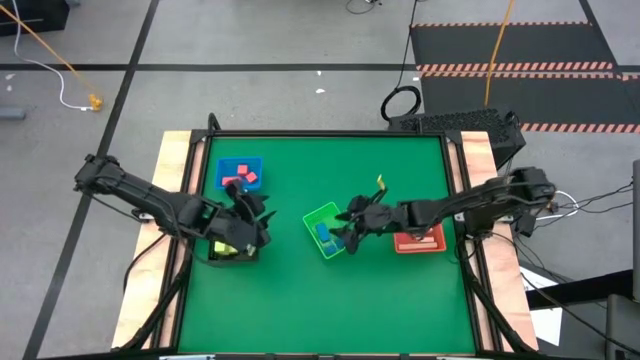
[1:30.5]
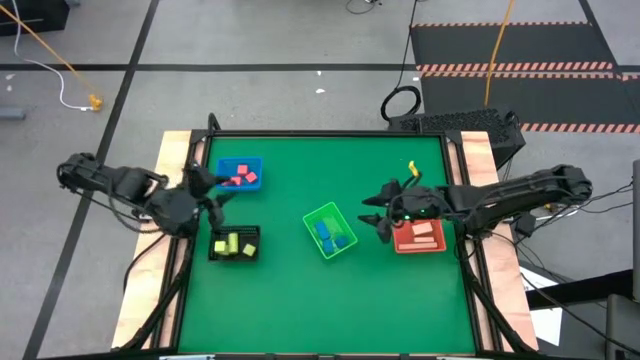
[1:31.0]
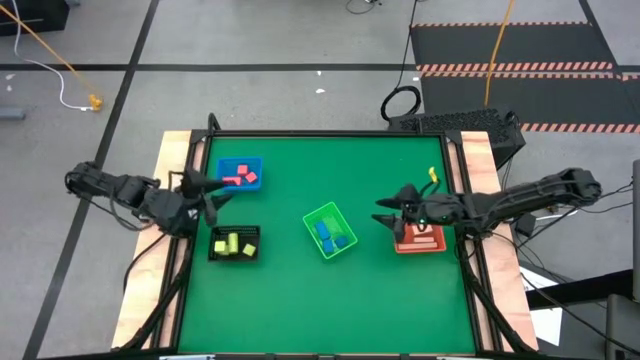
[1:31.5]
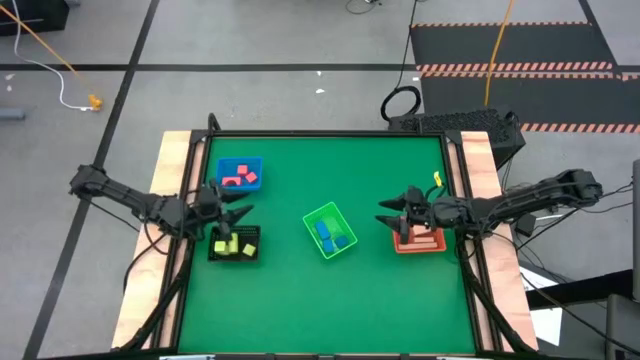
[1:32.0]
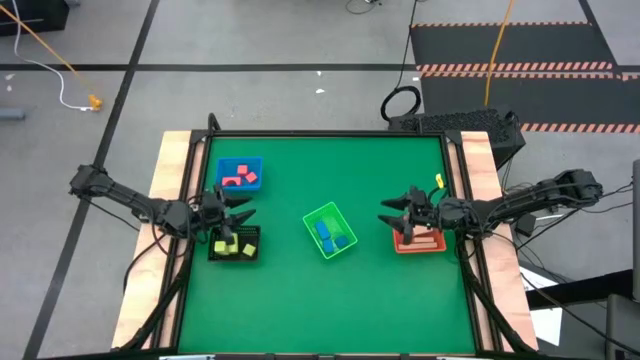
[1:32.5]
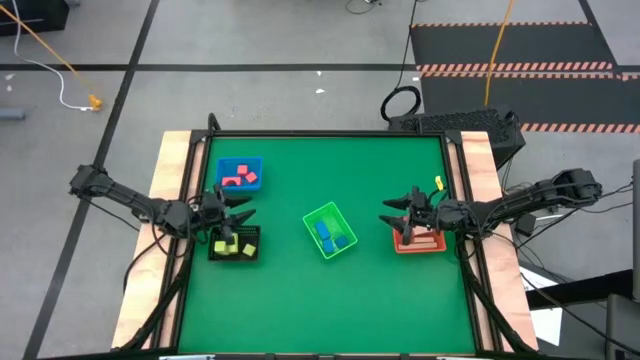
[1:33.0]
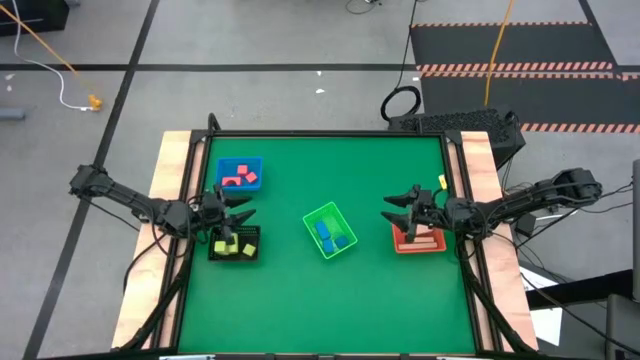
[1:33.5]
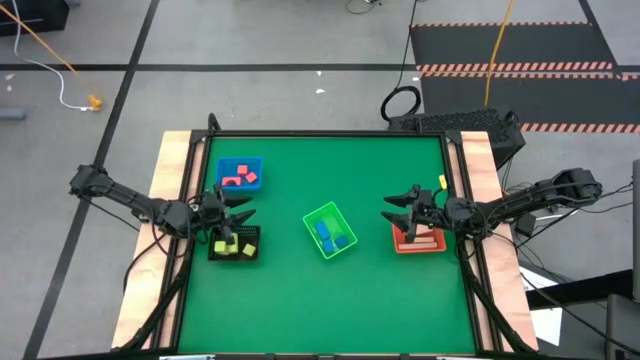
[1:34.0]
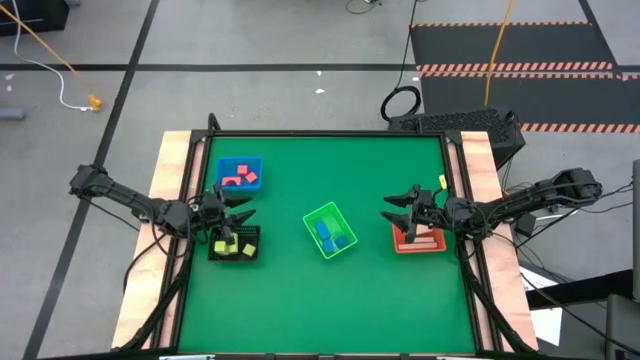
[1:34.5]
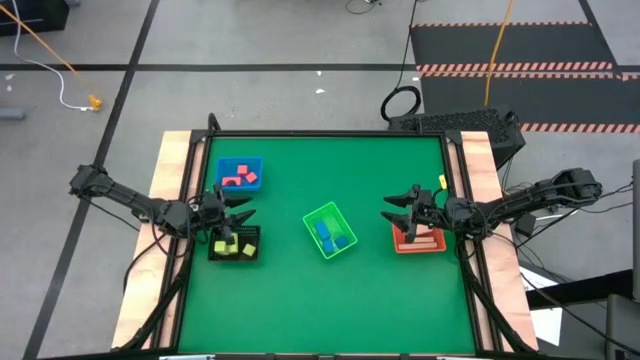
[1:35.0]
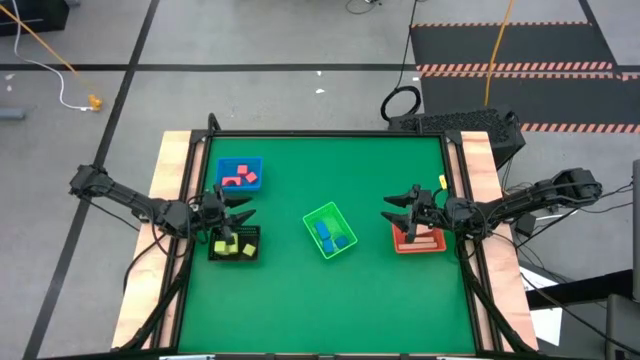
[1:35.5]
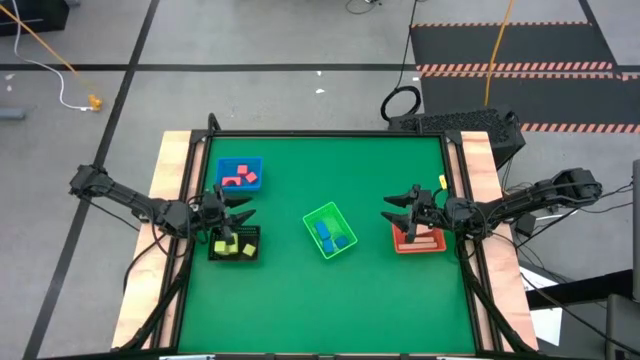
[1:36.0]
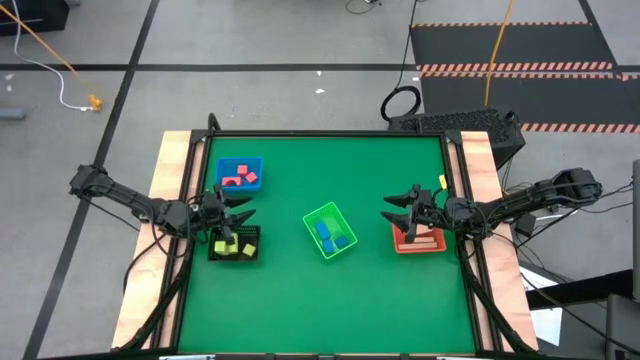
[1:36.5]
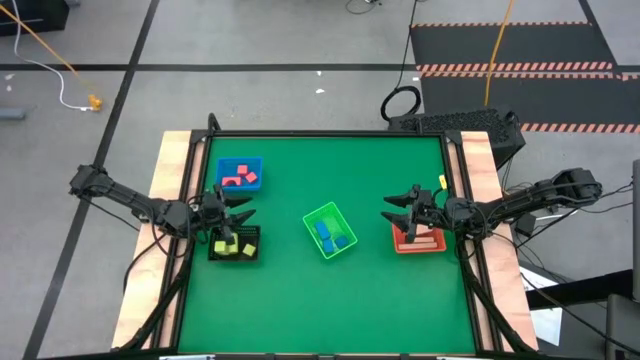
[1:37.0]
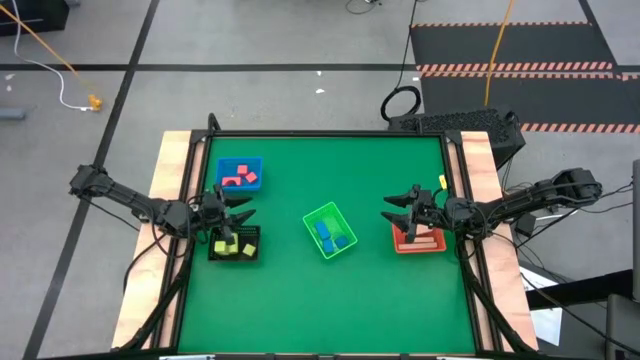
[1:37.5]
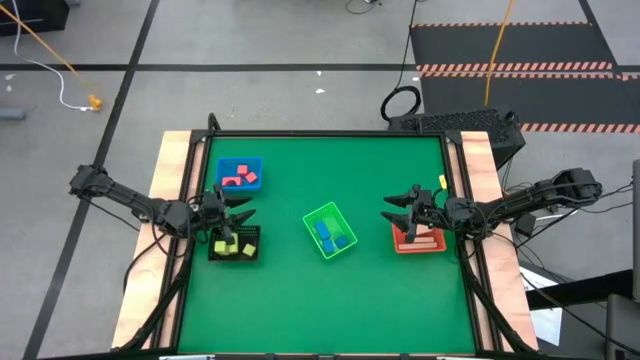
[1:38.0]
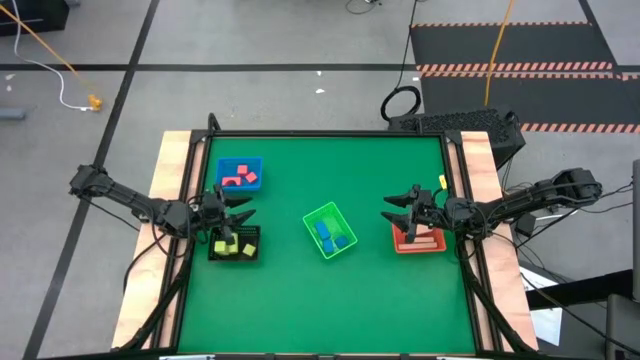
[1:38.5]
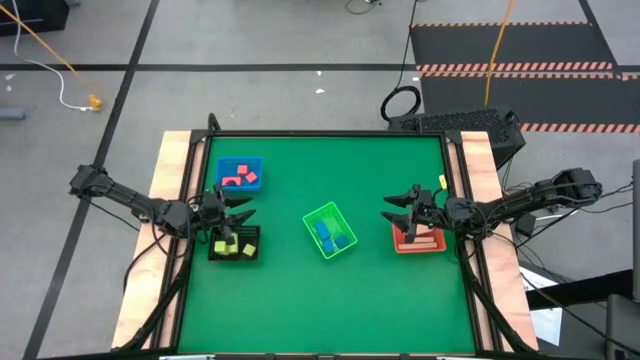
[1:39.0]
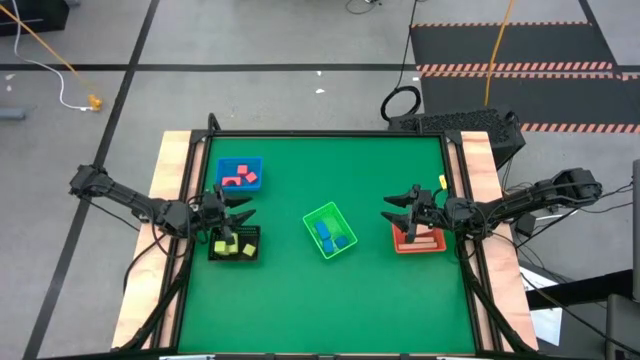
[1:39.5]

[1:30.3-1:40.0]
Task: Sort & place blocks by color
Return to Home Position

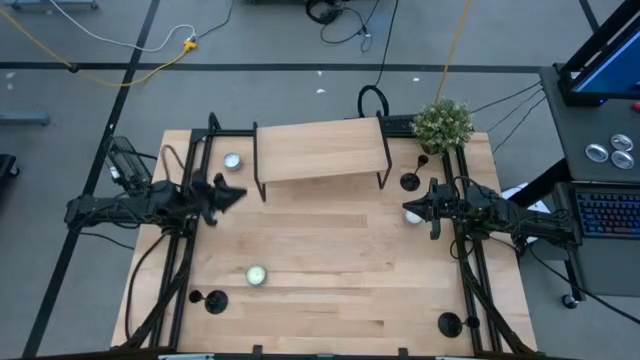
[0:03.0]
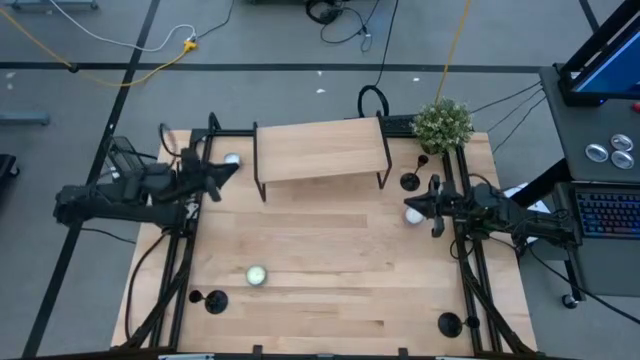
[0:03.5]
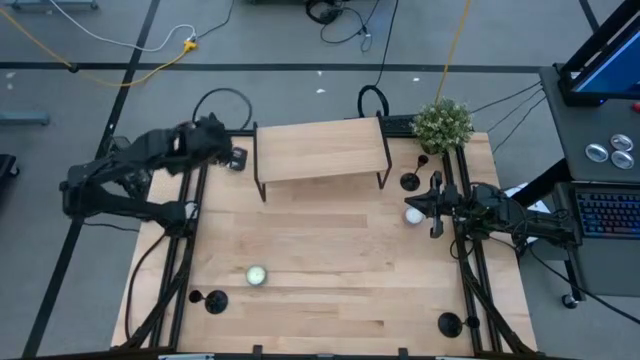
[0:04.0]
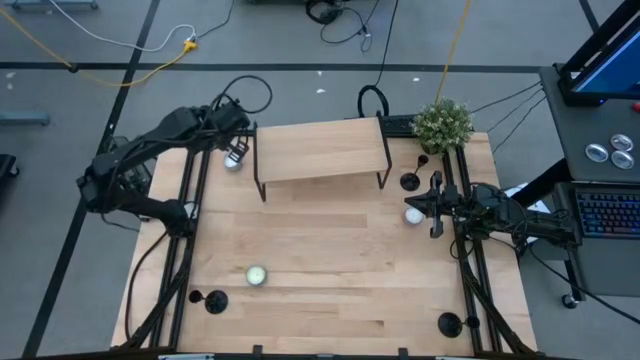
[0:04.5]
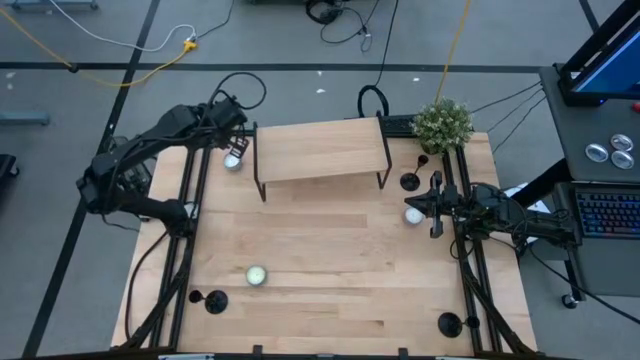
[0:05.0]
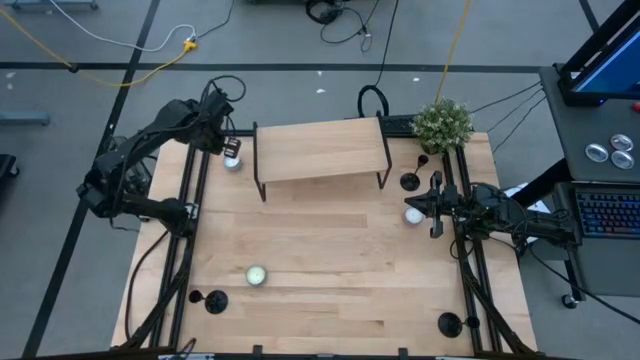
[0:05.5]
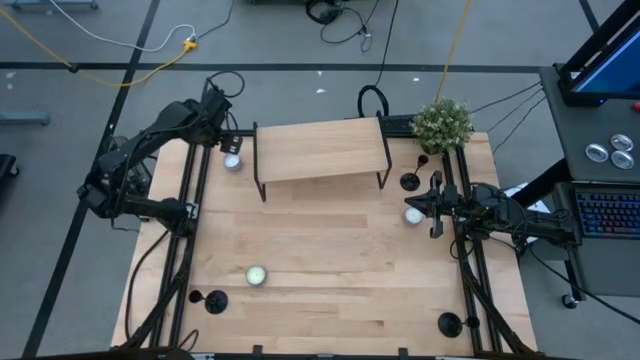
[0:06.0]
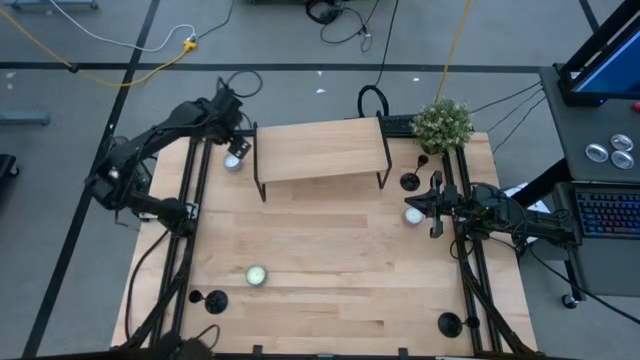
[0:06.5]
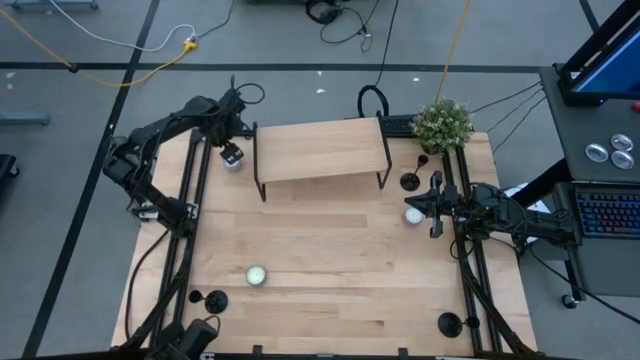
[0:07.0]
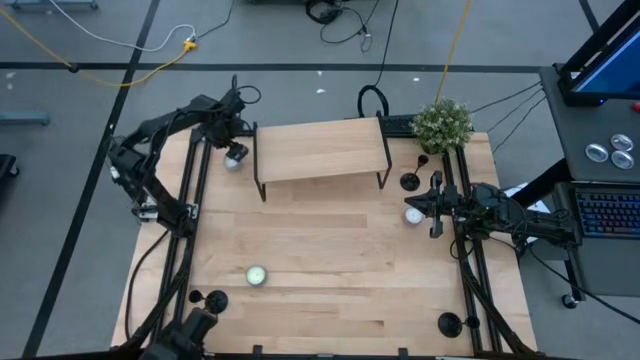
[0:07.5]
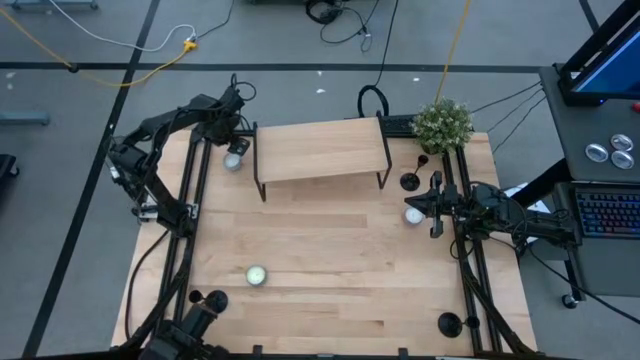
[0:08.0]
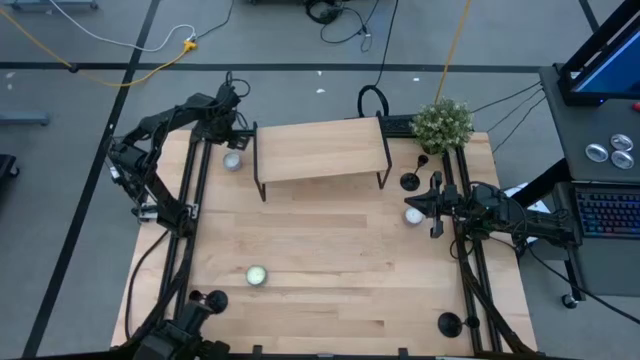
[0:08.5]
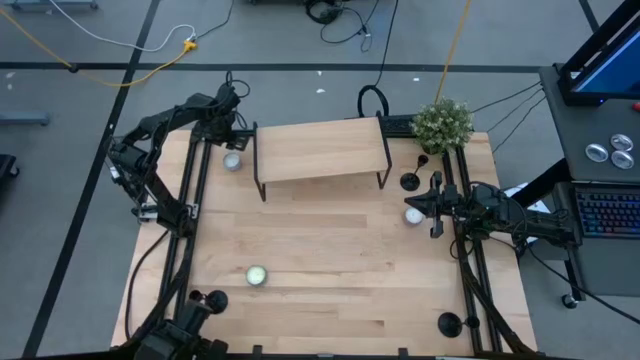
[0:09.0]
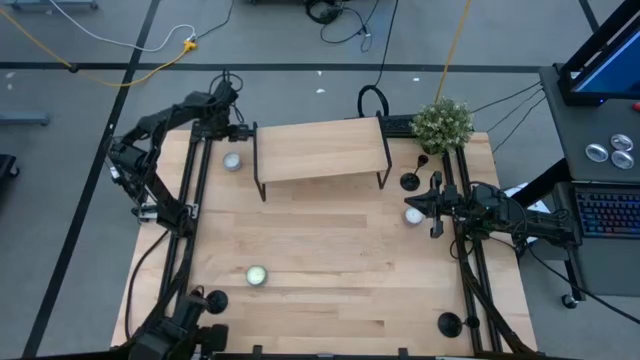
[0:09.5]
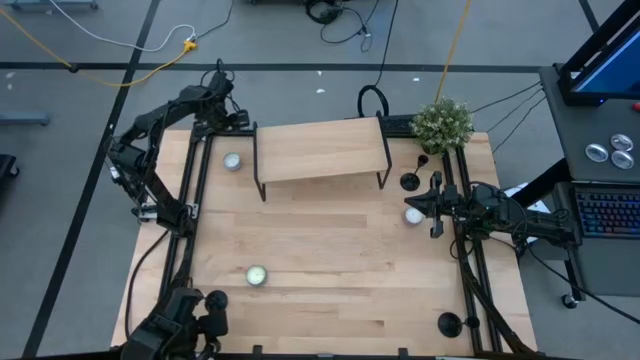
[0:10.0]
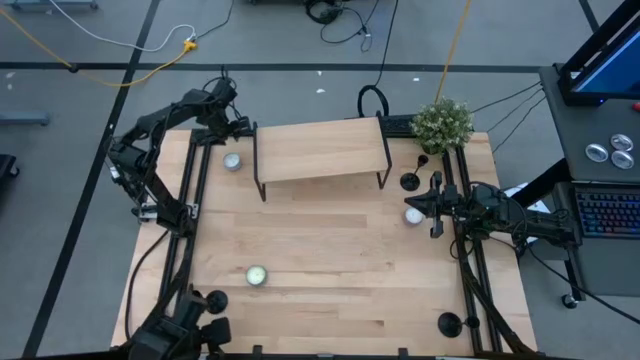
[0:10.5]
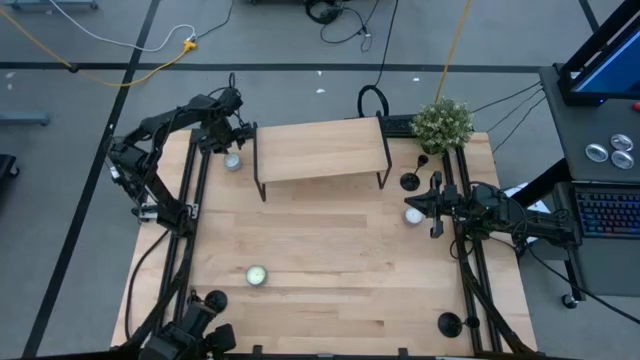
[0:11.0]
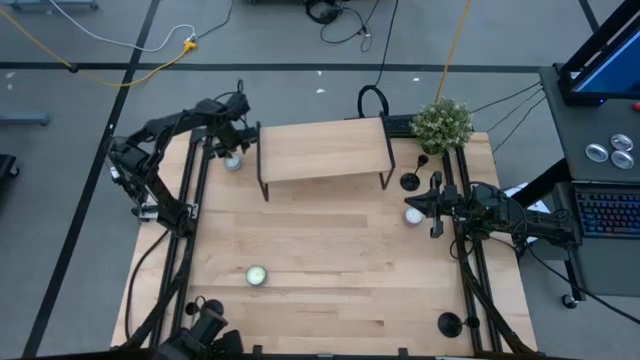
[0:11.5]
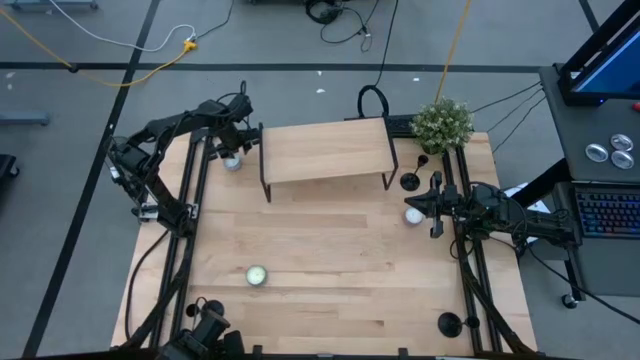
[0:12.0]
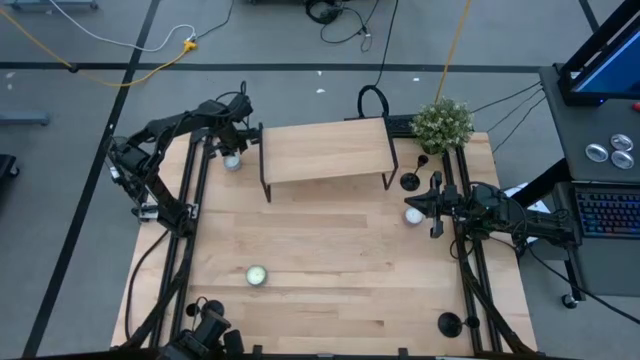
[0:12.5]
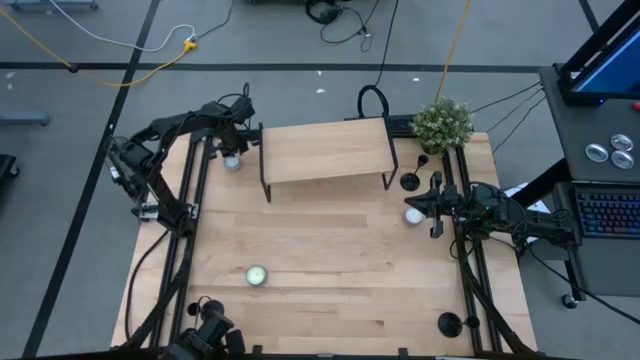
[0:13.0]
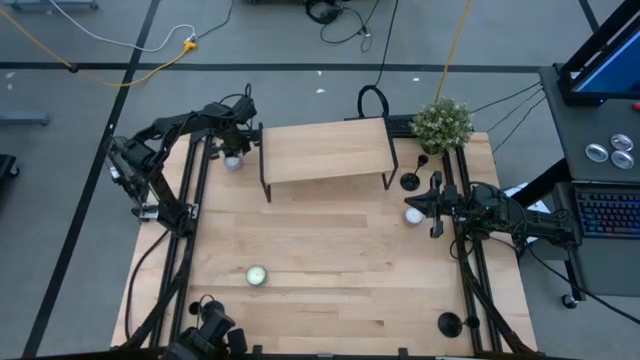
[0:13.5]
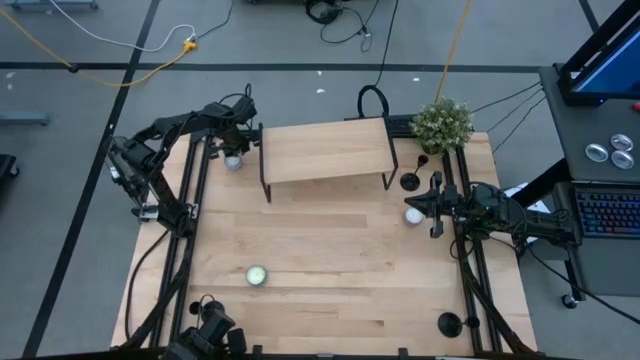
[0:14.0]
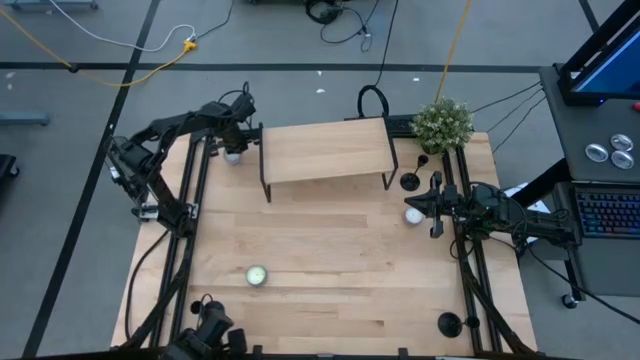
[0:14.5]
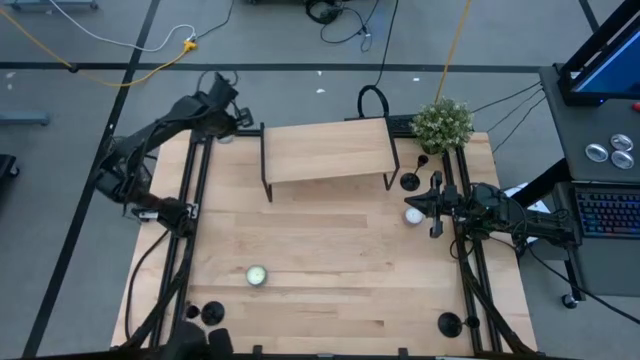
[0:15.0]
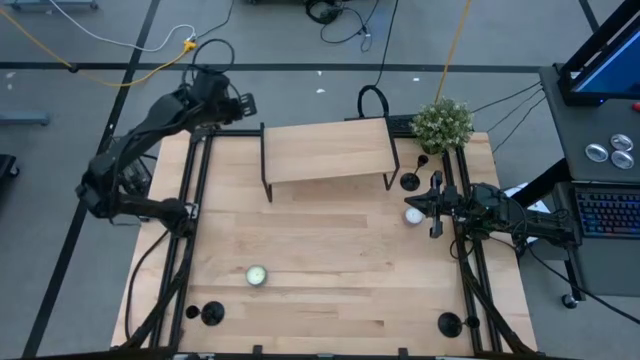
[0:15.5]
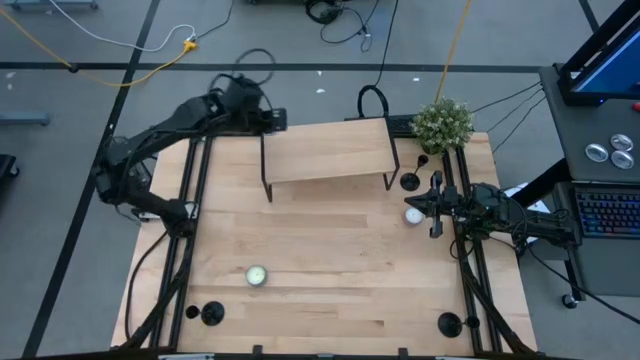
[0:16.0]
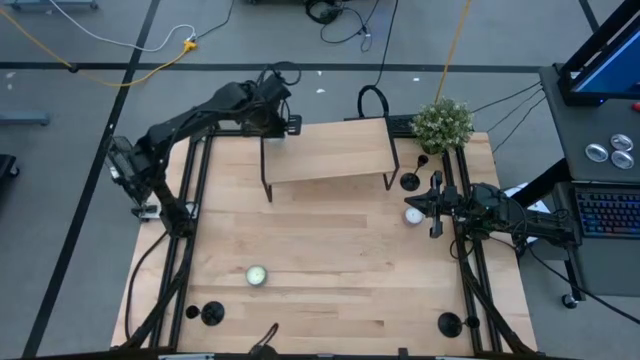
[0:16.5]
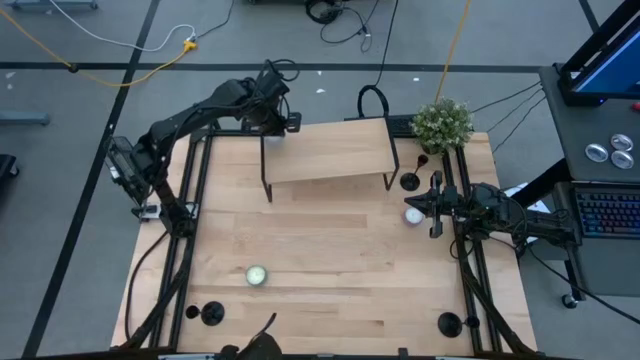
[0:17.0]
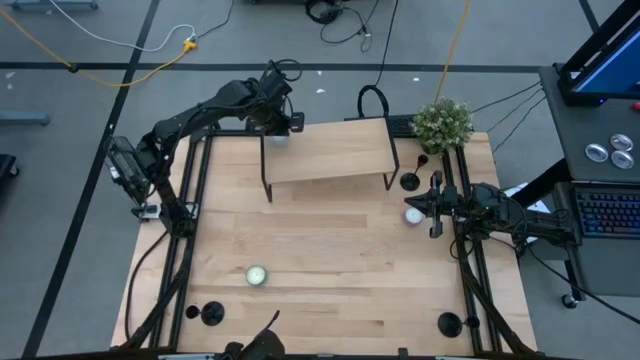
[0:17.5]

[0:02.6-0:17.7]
Task: Pick & Place candle stick holders
Put the red and white scented candle on the shelf
